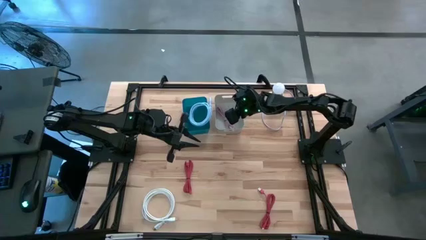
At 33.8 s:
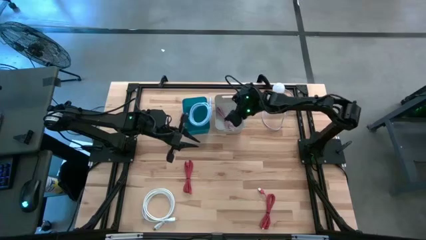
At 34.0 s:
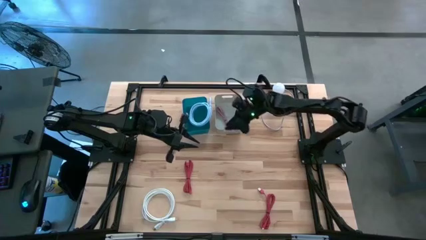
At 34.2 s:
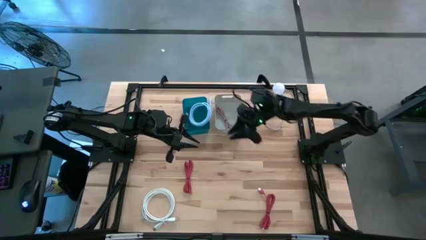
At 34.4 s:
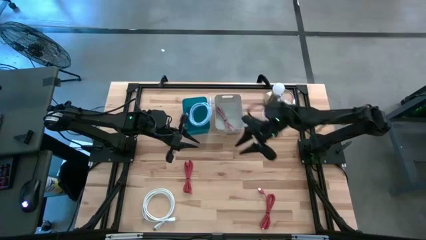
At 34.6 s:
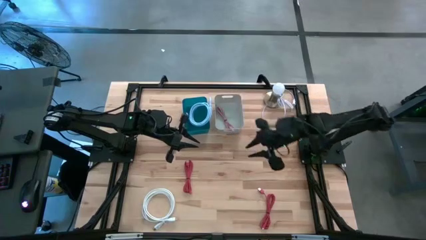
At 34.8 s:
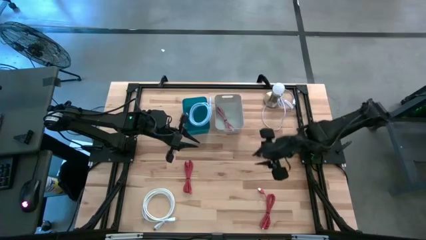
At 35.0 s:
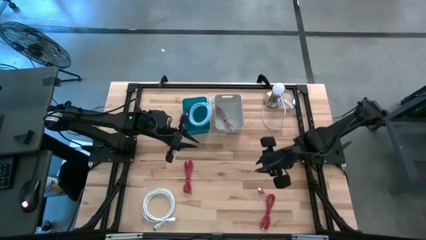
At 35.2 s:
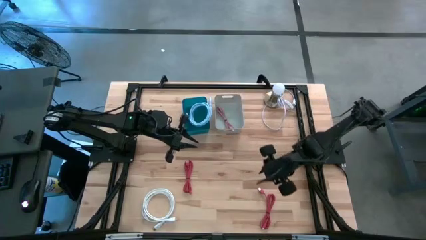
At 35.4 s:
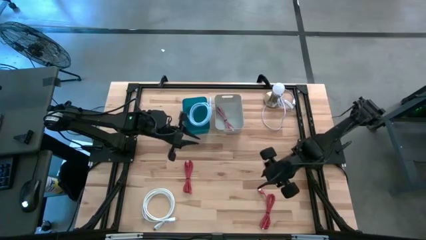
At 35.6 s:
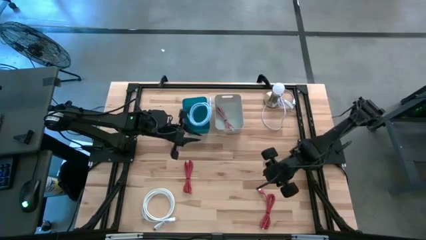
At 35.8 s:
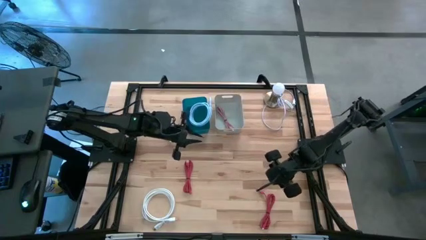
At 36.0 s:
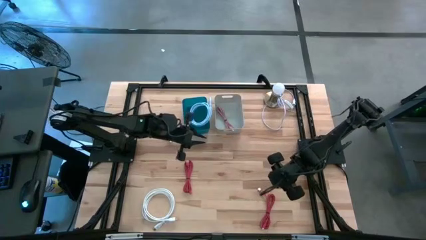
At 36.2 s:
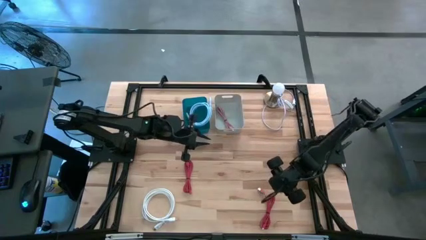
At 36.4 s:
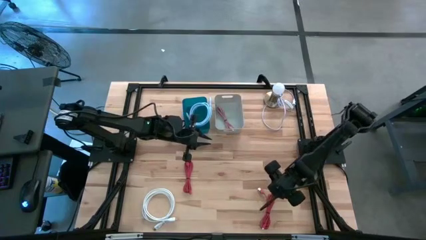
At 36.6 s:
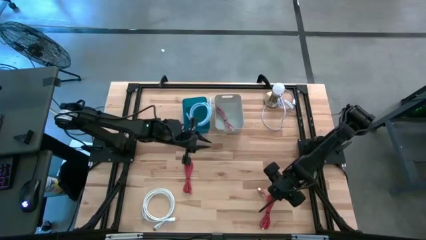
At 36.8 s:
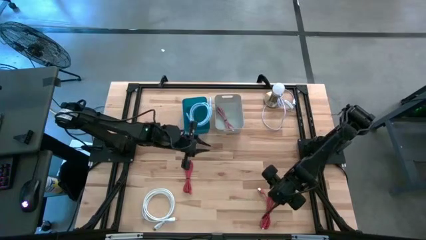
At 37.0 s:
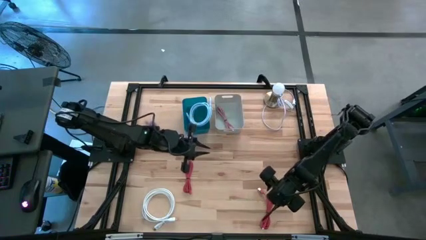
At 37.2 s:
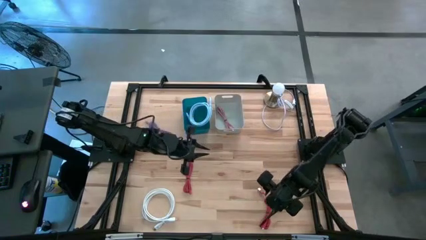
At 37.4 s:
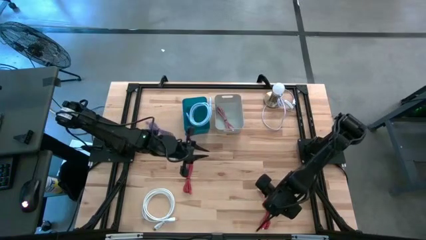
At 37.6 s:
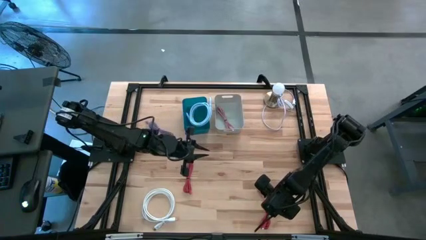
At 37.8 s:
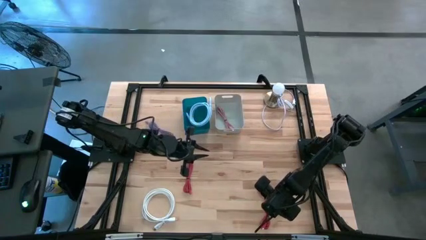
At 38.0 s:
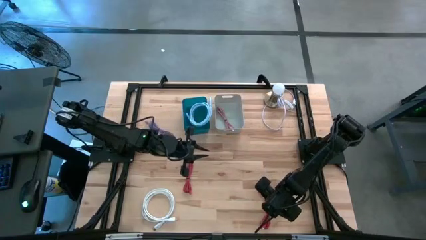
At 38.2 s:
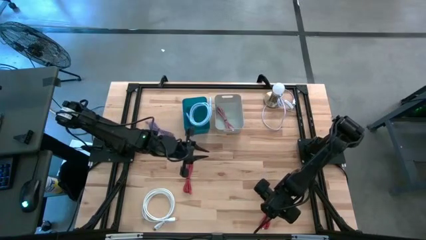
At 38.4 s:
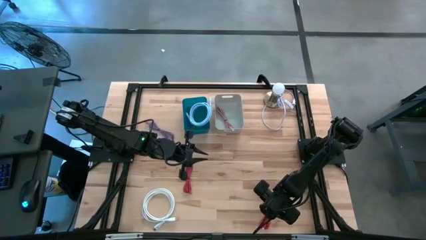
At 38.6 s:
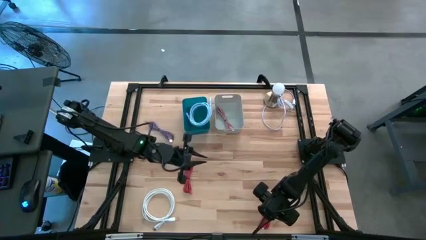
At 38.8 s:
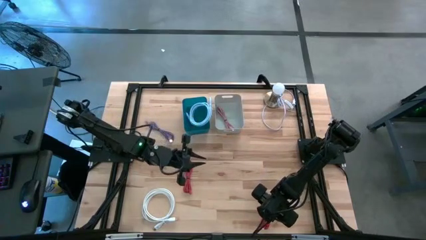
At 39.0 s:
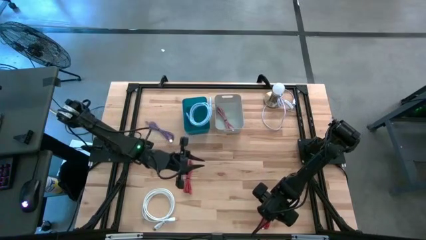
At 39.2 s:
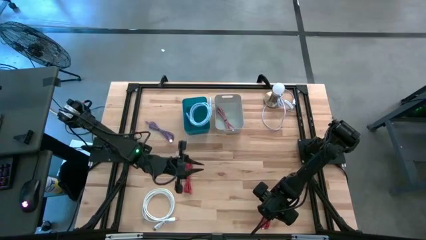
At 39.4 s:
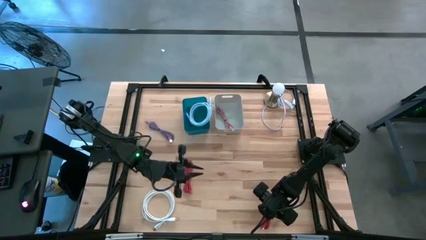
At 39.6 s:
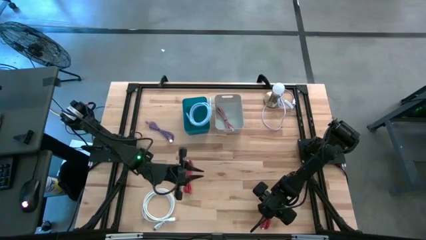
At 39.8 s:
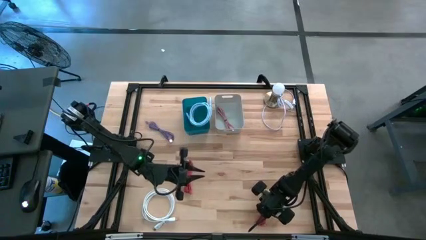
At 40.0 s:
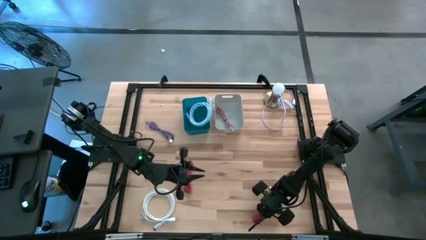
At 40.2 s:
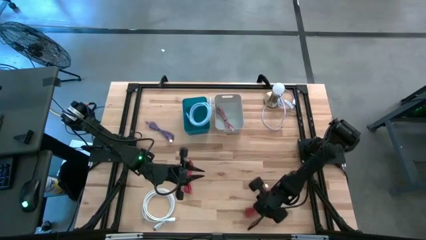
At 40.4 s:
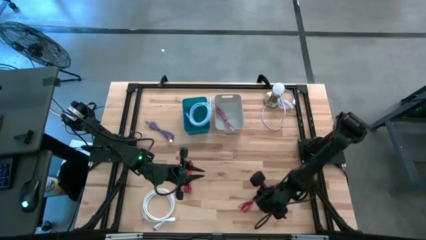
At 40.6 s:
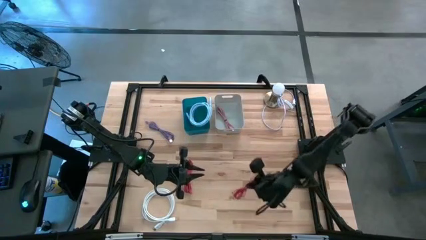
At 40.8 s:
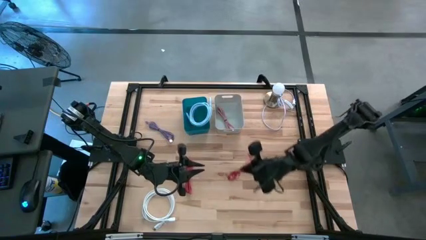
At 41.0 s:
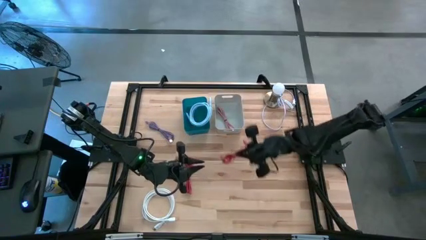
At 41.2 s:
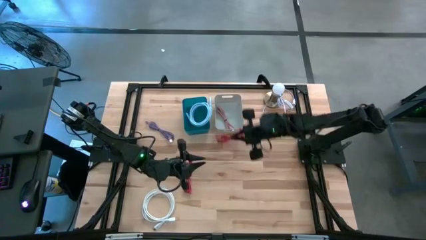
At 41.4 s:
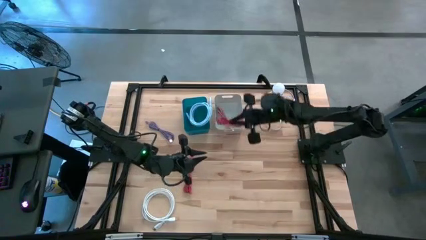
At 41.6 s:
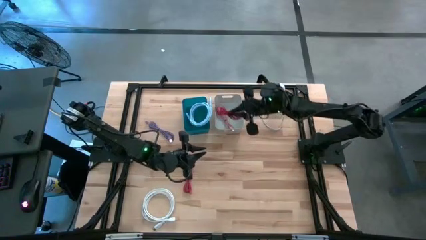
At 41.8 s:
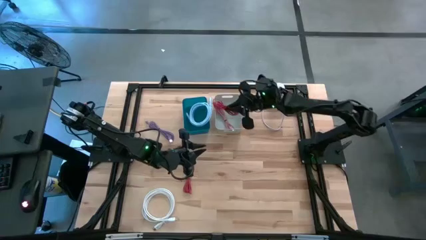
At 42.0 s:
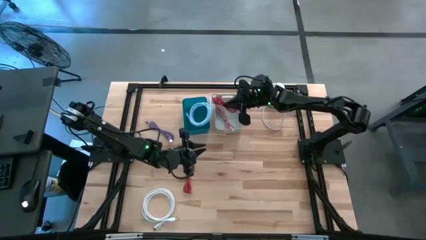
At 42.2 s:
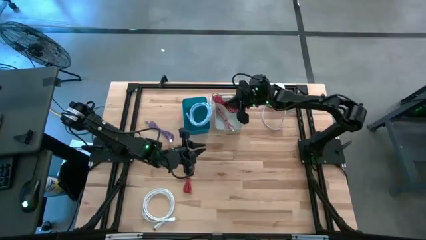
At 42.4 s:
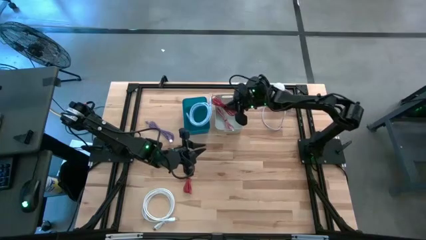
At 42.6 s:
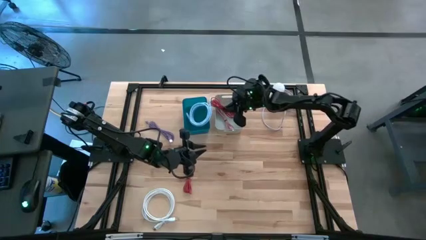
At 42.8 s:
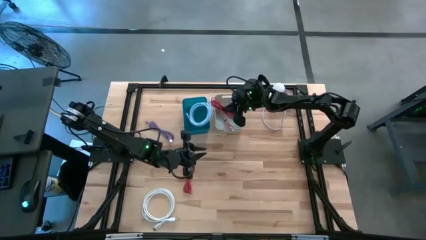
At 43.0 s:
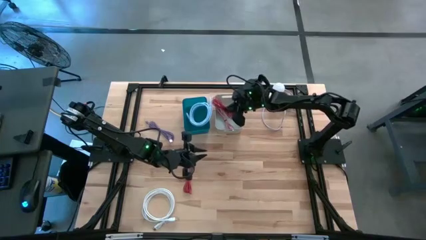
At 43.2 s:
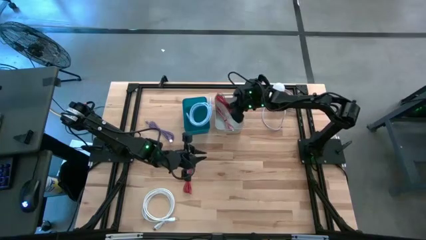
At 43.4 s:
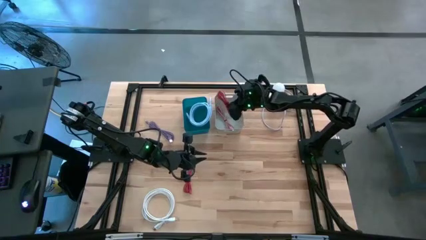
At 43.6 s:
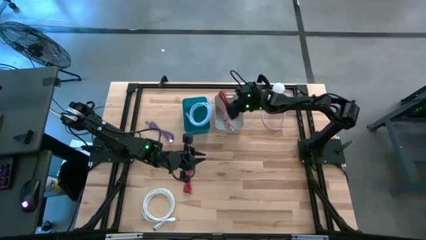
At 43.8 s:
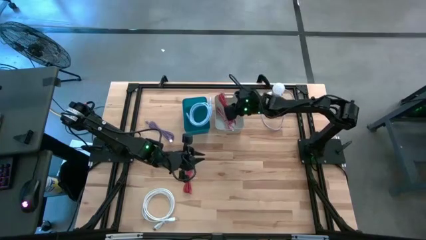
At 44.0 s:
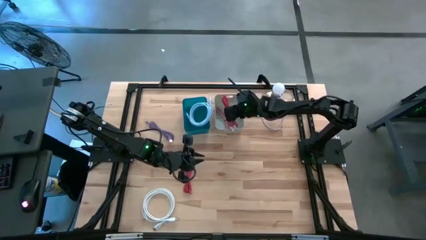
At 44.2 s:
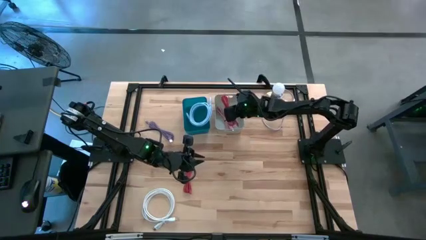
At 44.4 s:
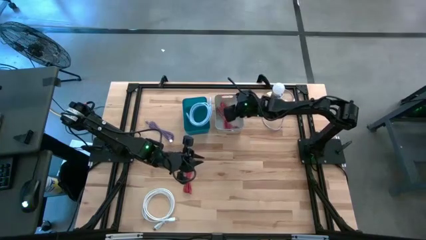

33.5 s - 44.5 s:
Task: Pick & Place USB Port
Put the bottom red charger cable into the gray bin
